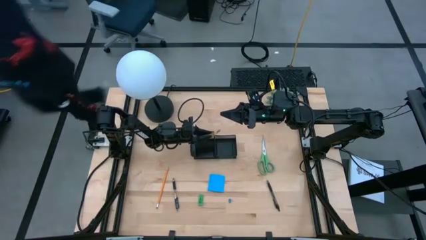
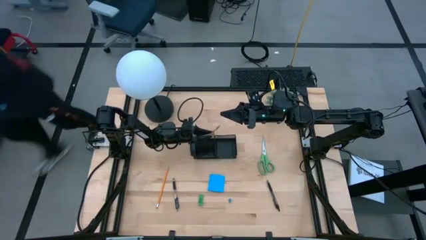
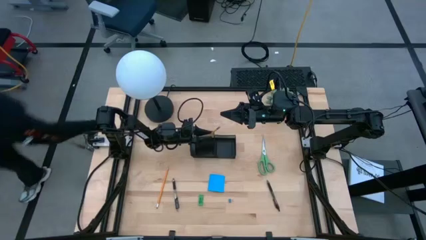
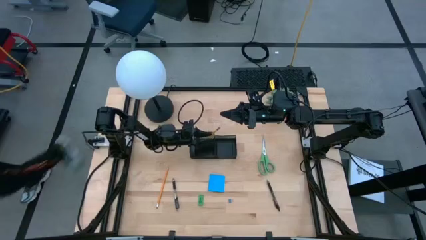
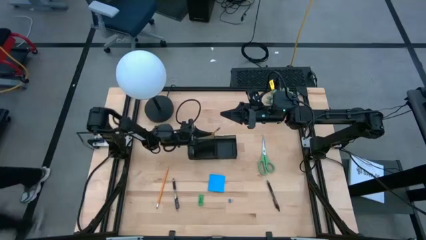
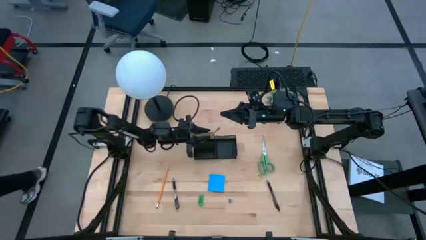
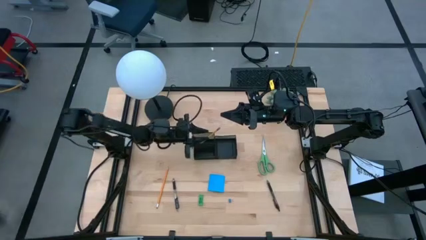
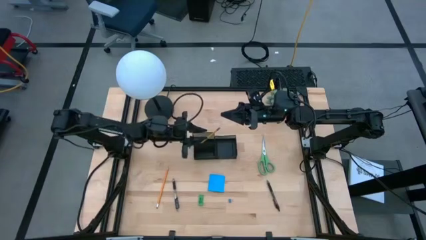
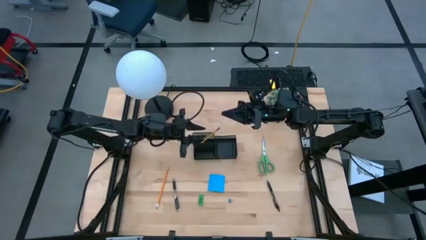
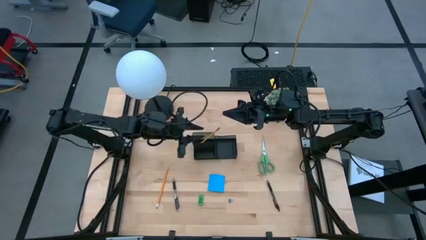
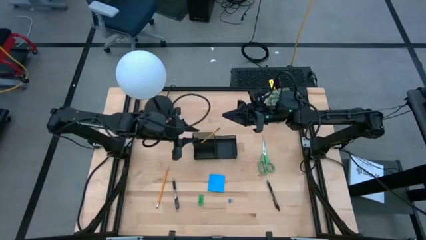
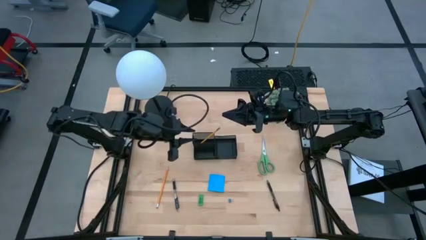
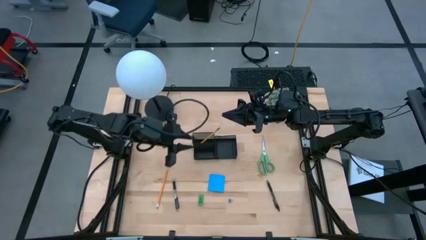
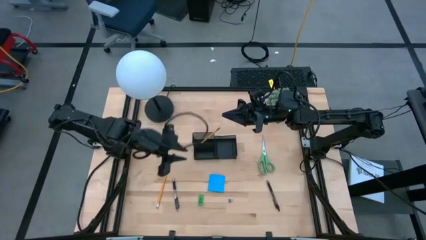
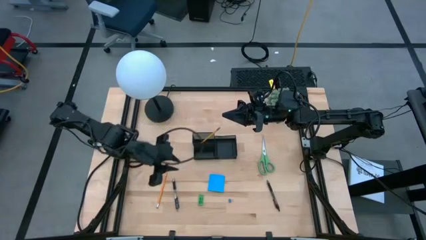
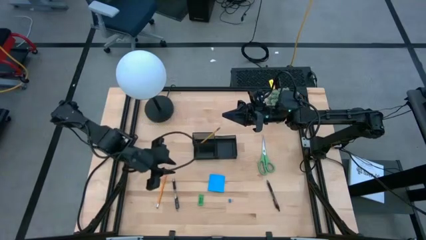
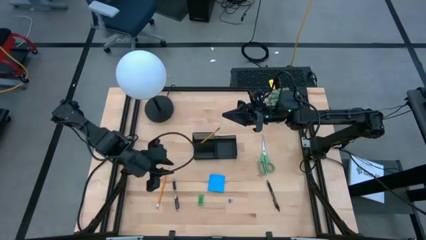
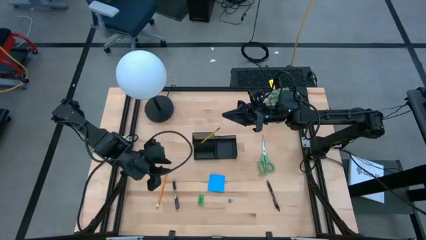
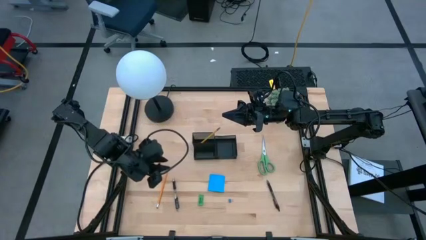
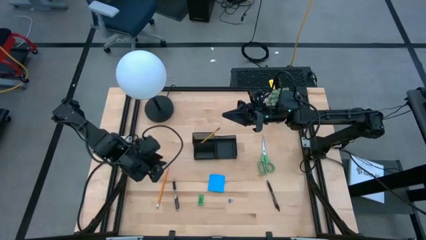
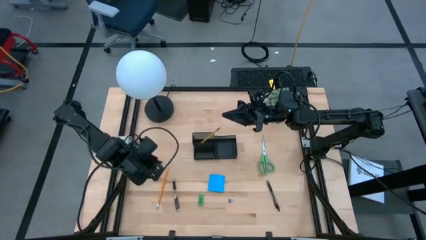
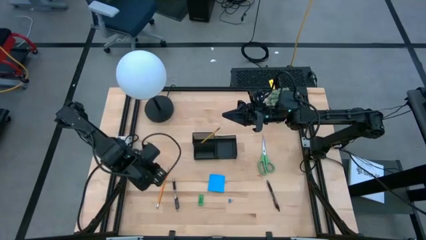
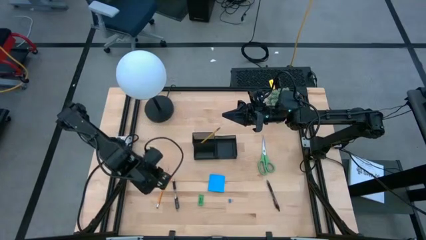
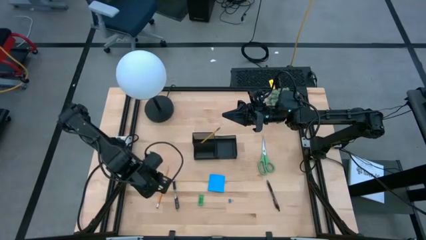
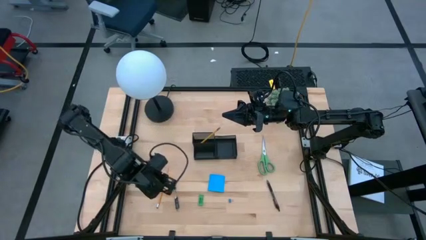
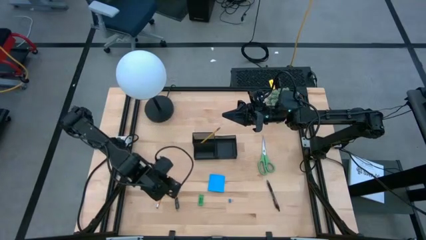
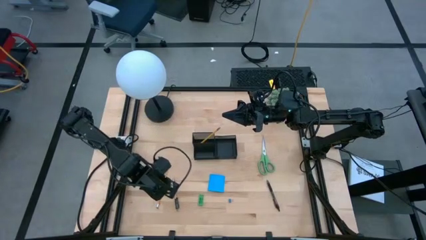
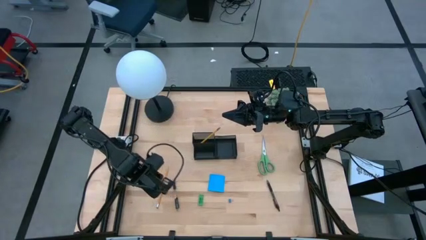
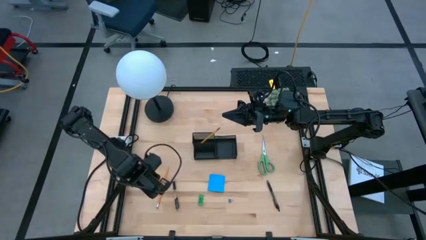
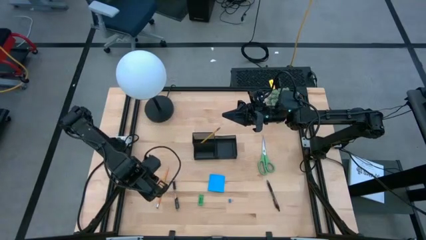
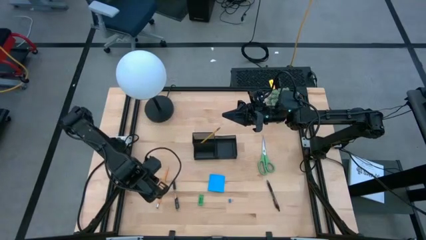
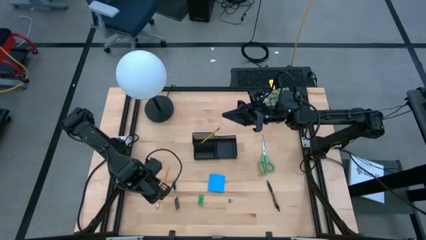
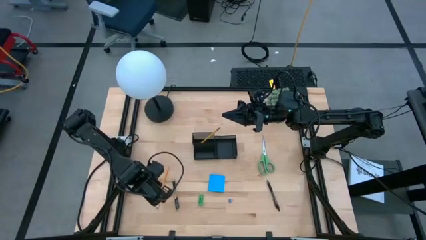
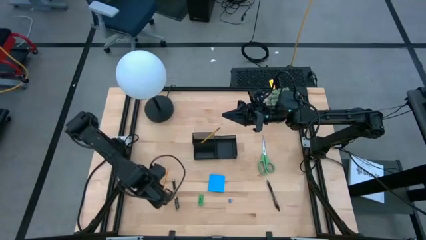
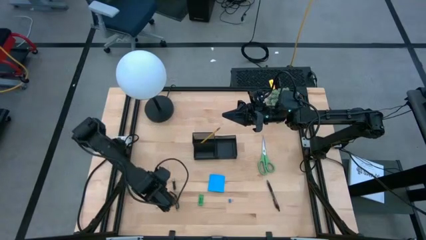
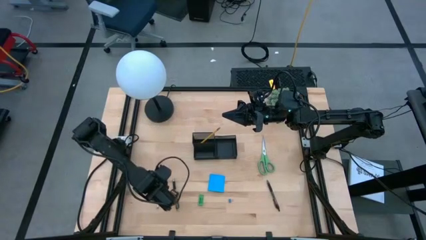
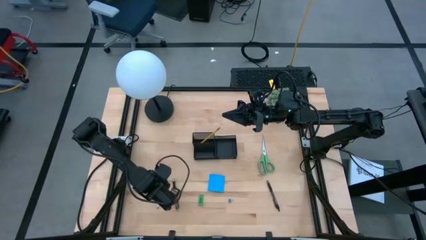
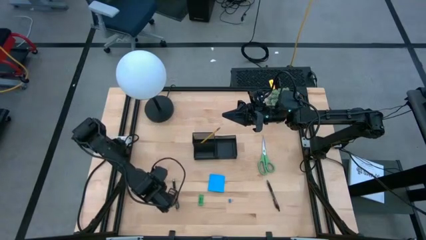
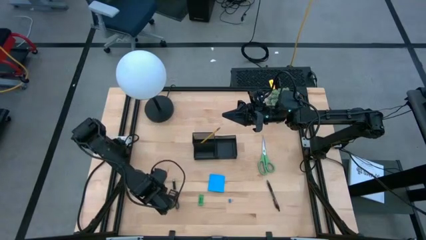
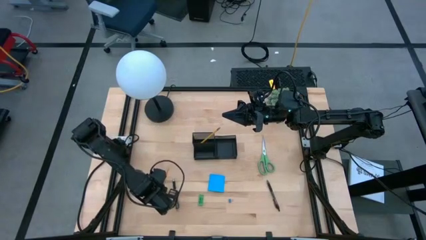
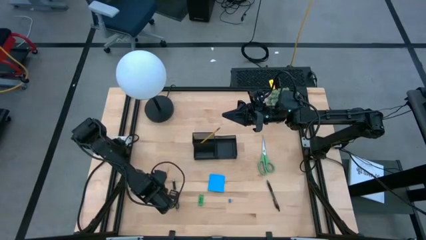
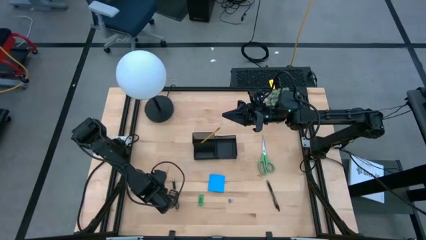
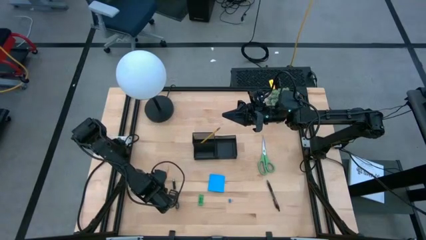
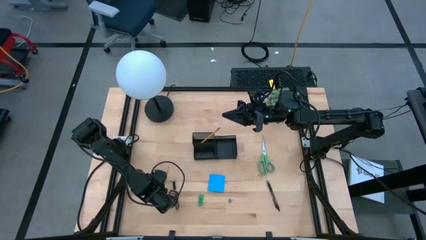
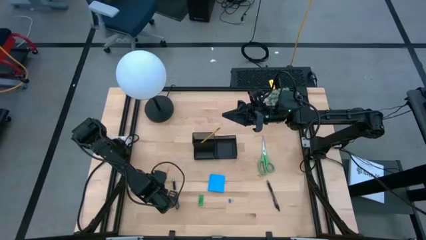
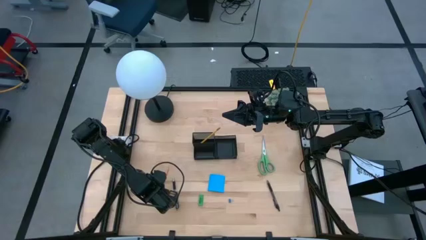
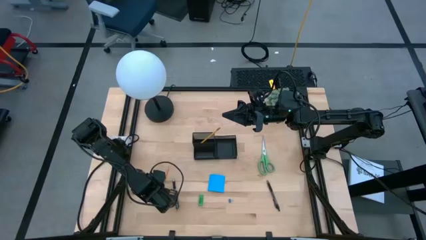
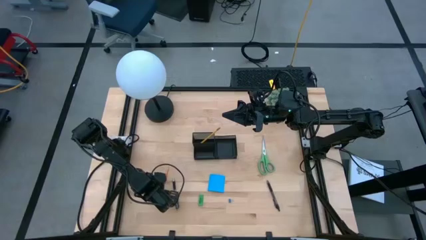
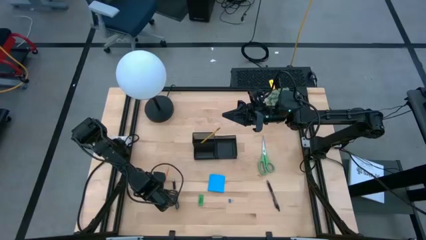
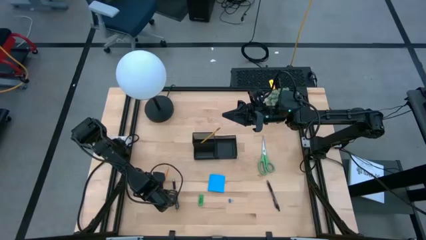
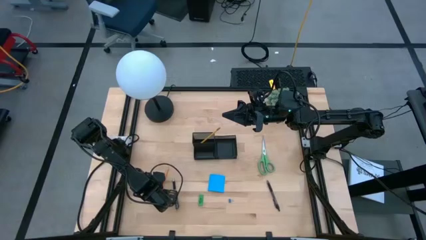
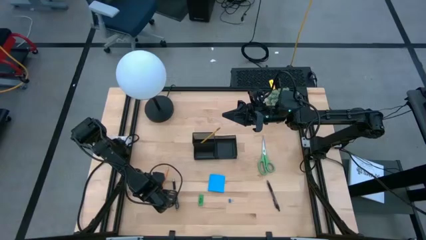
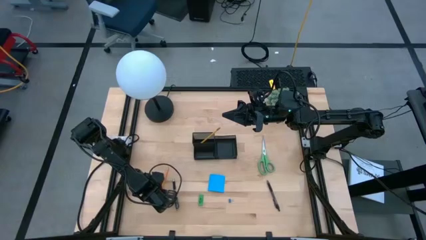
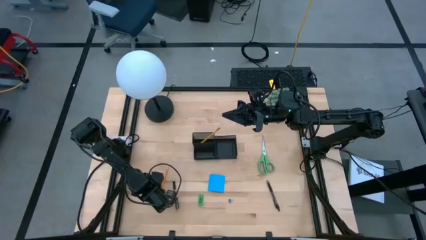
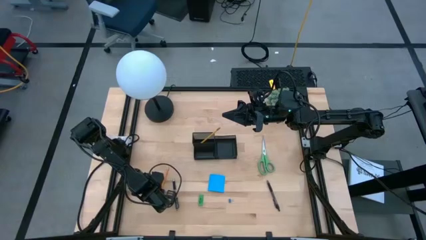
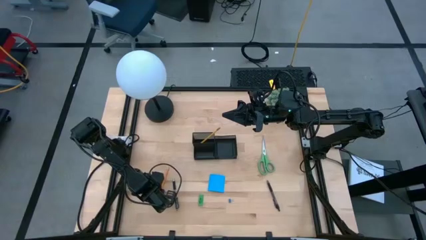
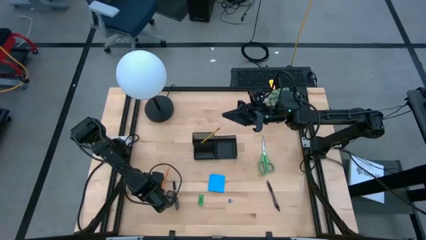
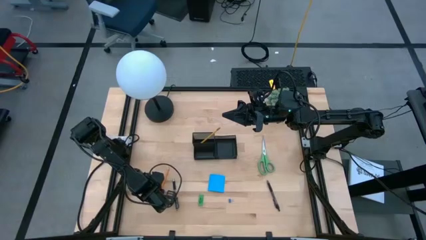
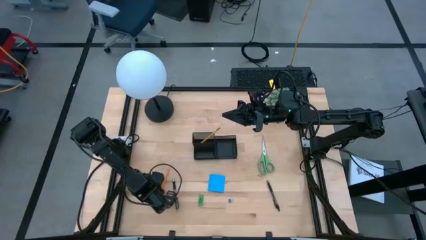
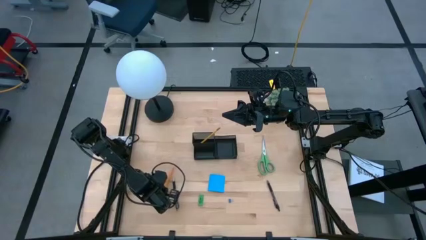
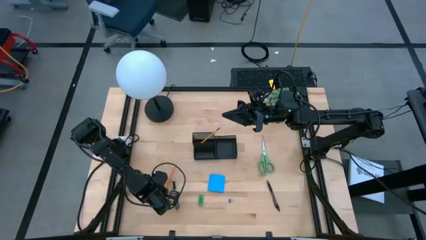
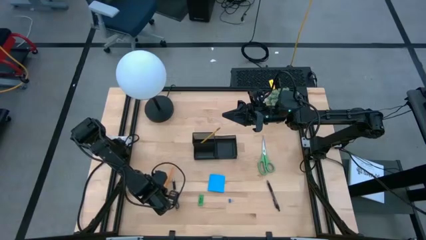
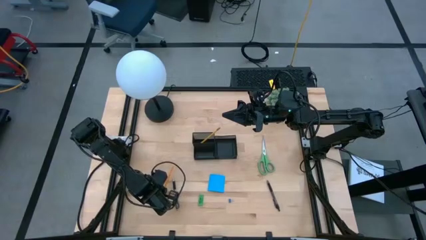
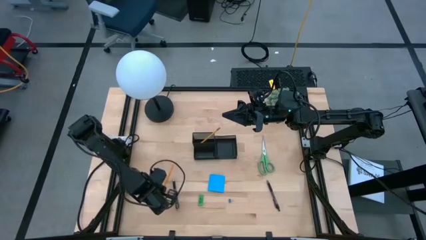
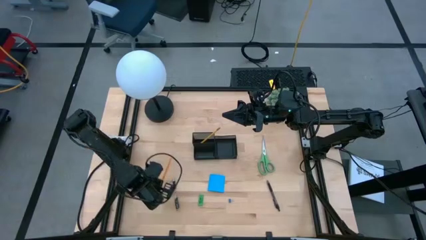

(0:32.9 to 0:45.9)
Task: Pick and place office supplies into organizer
Put the orange pencil into the black desk organizer
